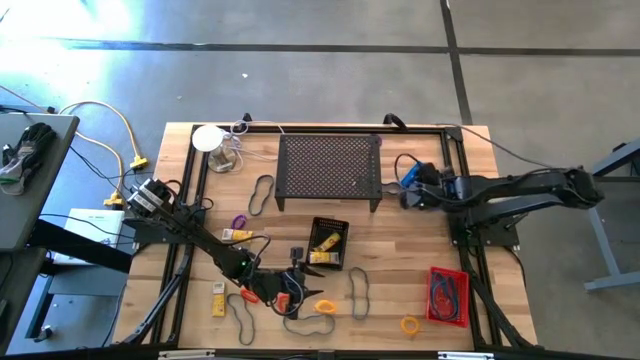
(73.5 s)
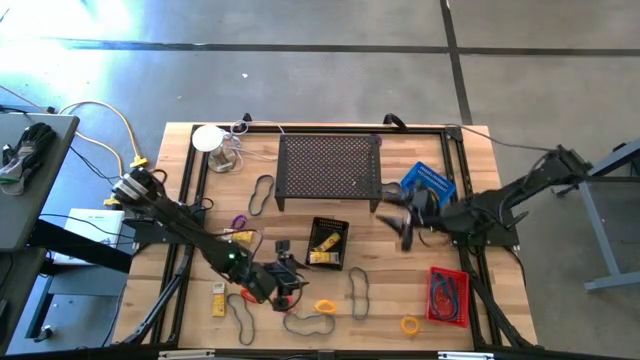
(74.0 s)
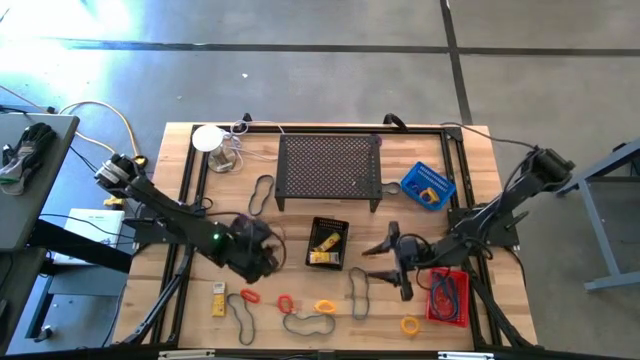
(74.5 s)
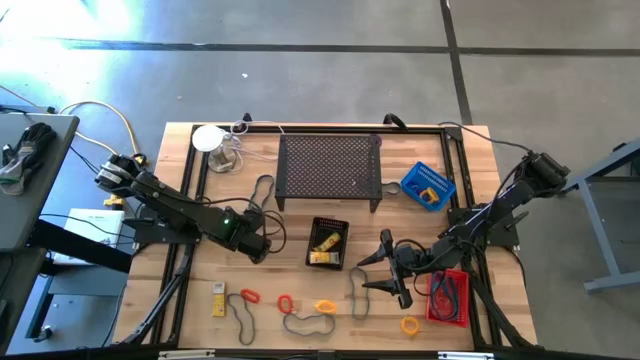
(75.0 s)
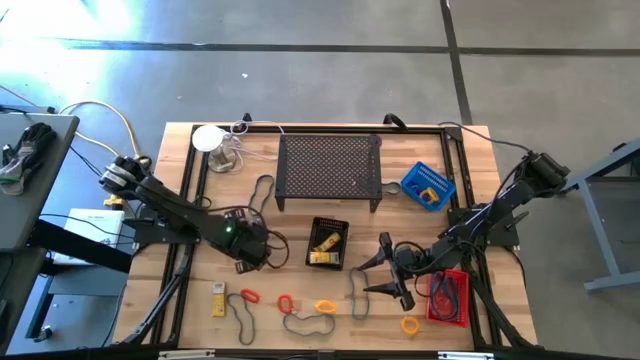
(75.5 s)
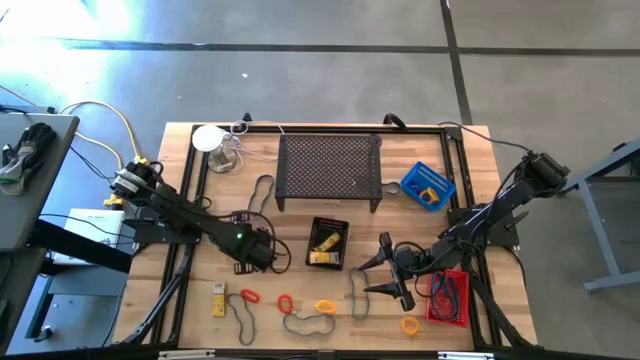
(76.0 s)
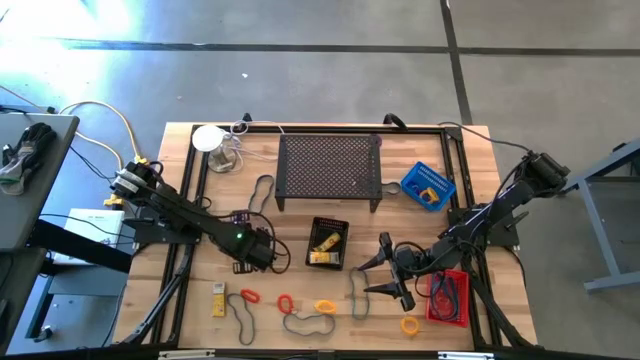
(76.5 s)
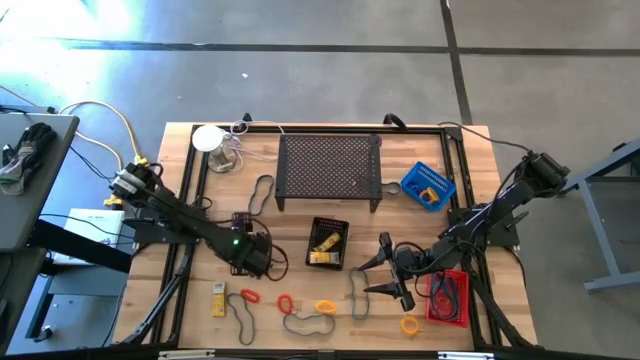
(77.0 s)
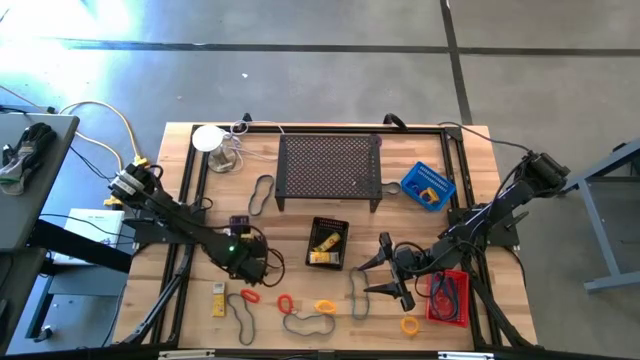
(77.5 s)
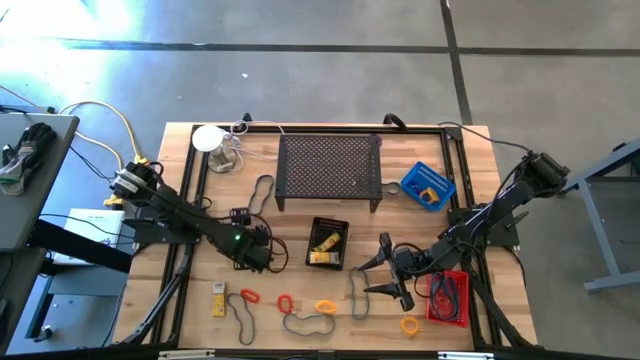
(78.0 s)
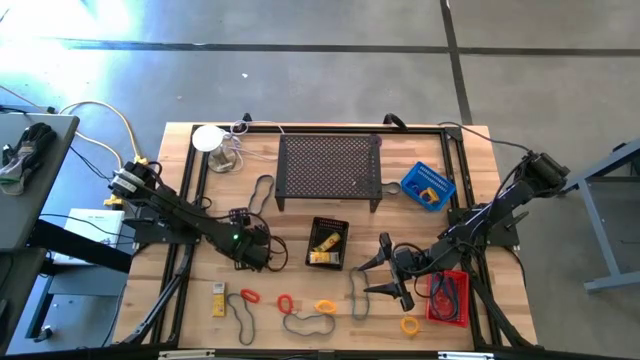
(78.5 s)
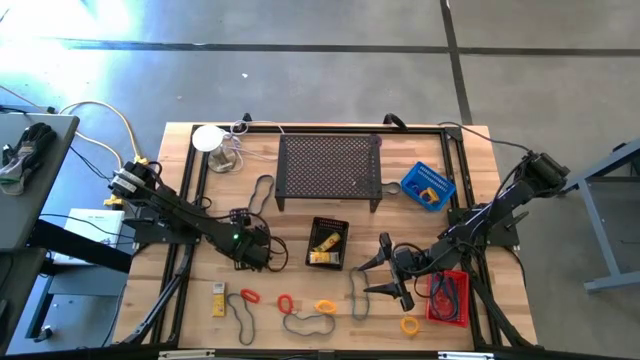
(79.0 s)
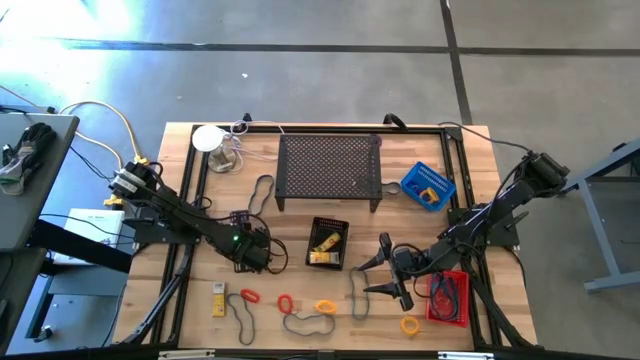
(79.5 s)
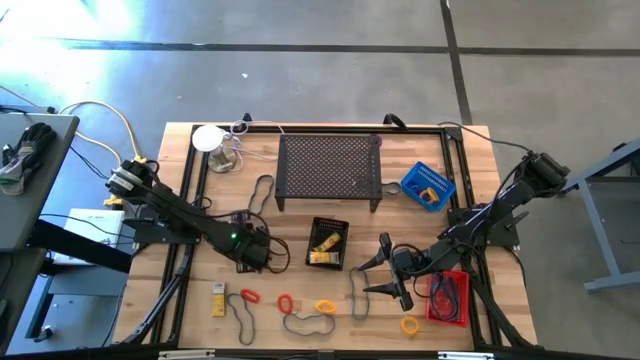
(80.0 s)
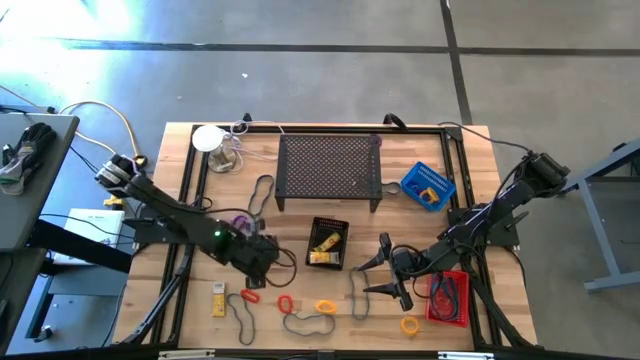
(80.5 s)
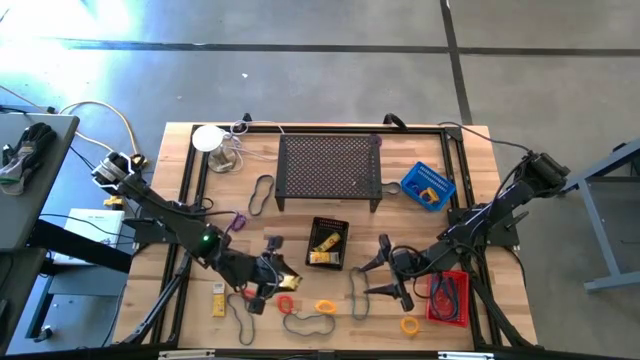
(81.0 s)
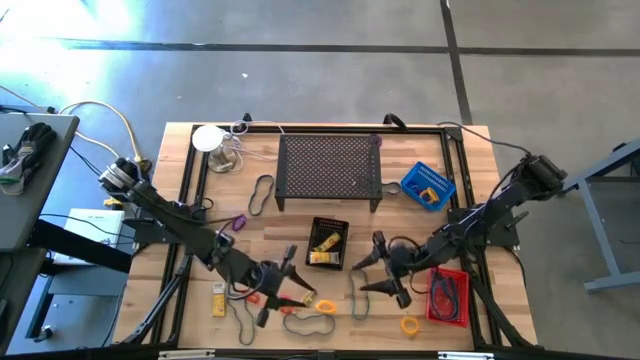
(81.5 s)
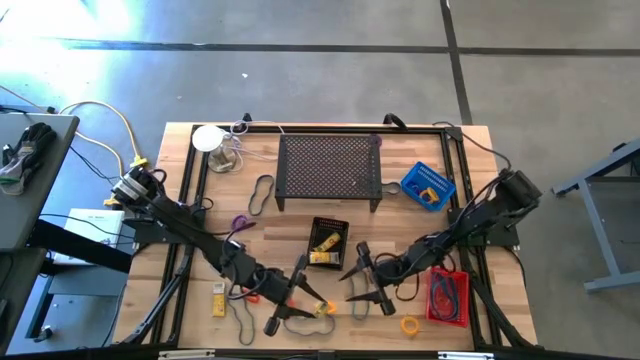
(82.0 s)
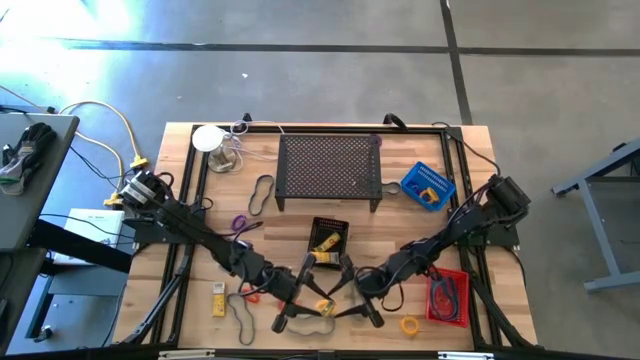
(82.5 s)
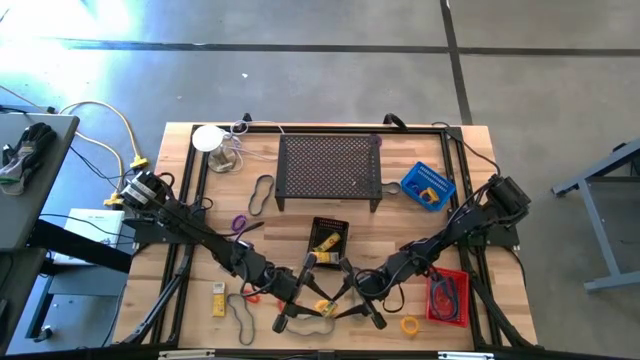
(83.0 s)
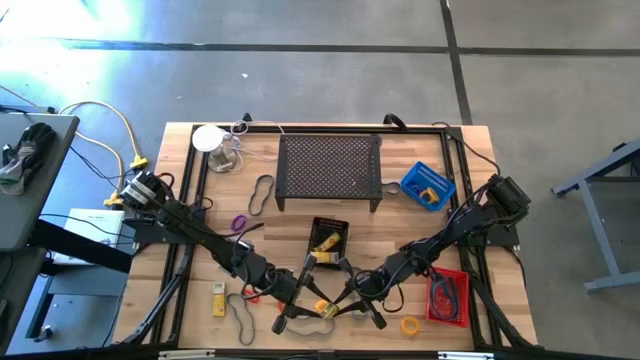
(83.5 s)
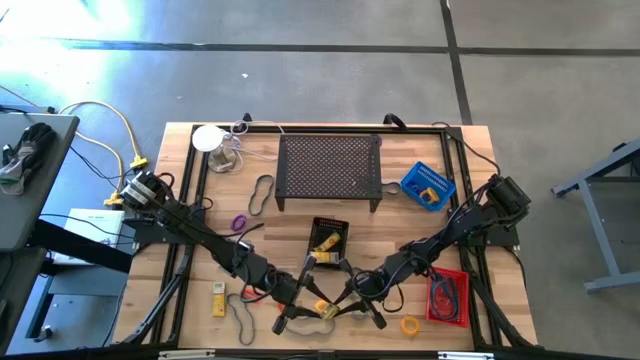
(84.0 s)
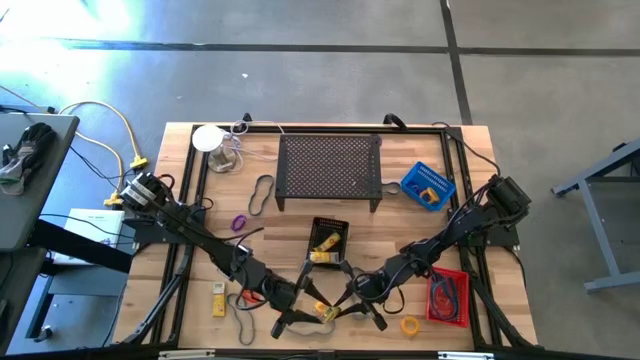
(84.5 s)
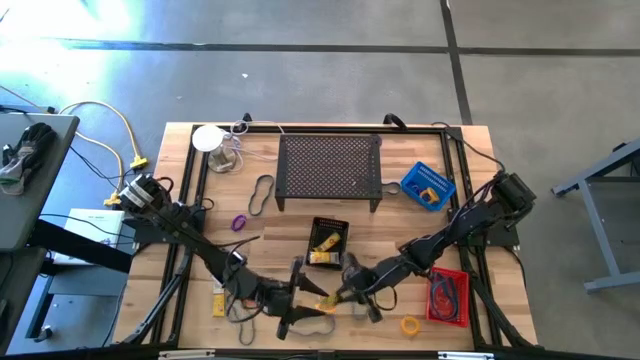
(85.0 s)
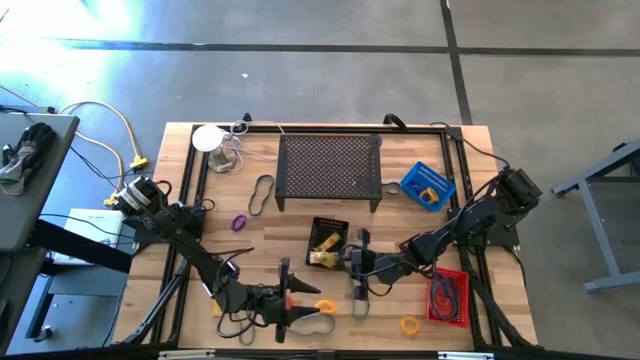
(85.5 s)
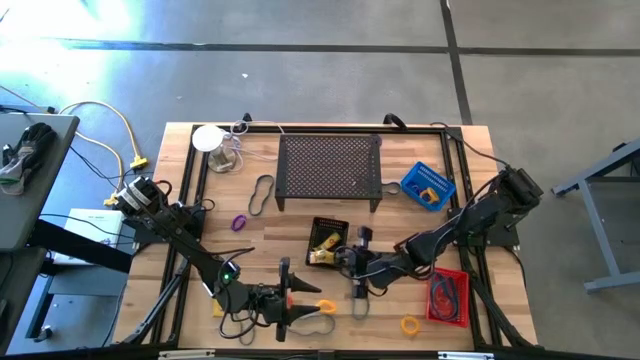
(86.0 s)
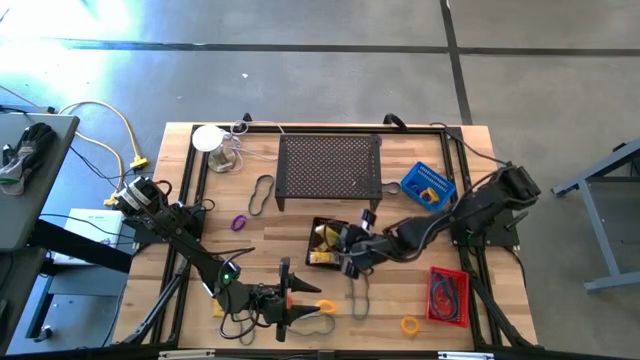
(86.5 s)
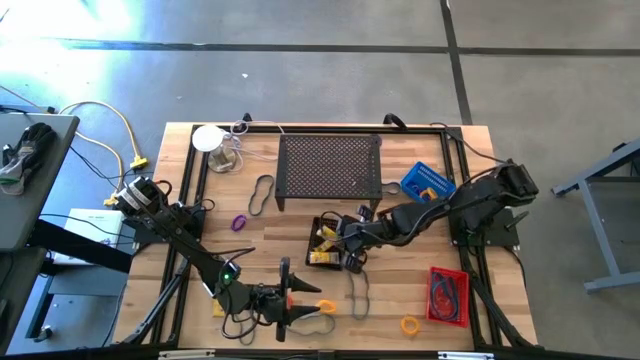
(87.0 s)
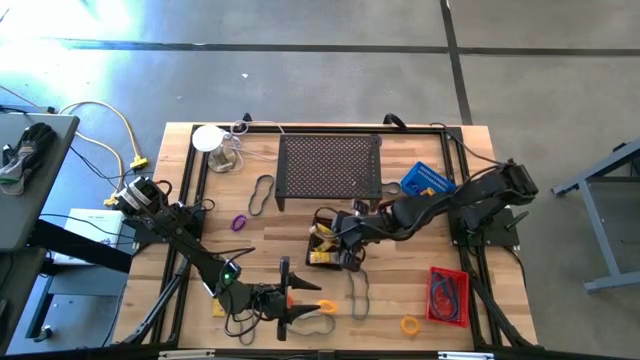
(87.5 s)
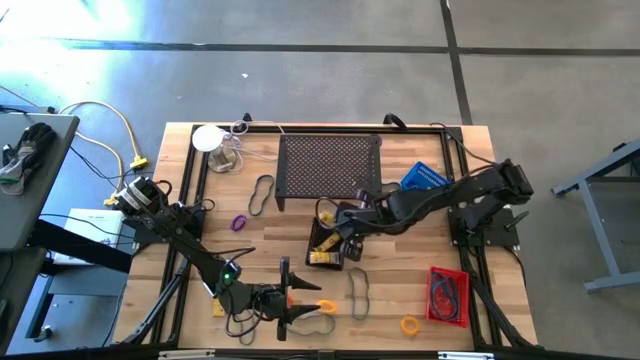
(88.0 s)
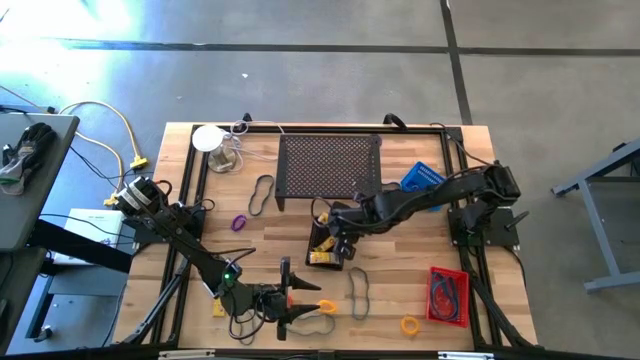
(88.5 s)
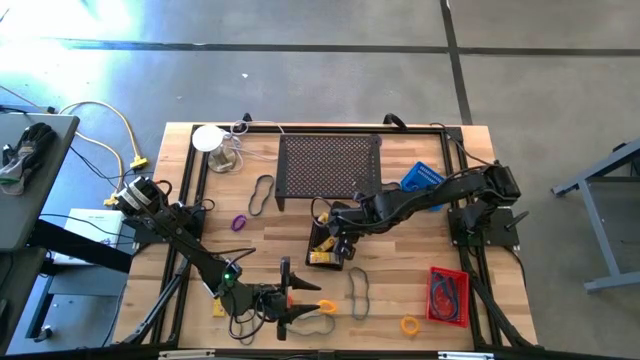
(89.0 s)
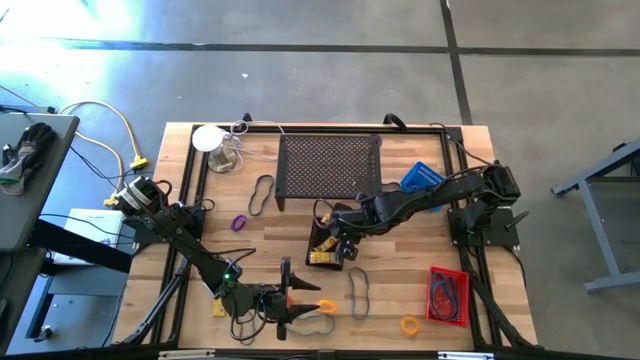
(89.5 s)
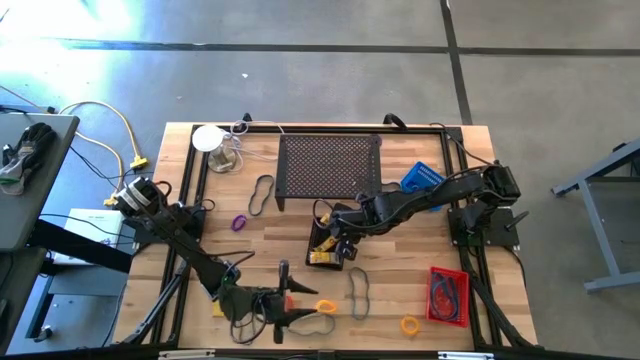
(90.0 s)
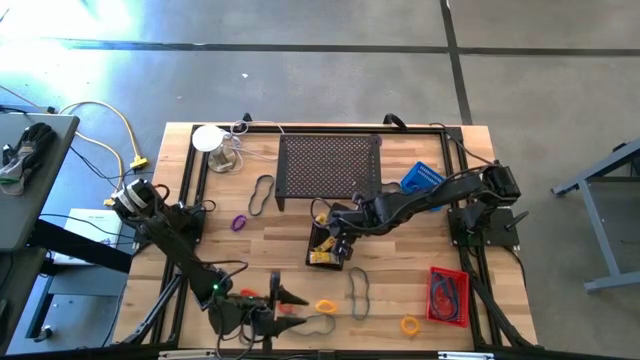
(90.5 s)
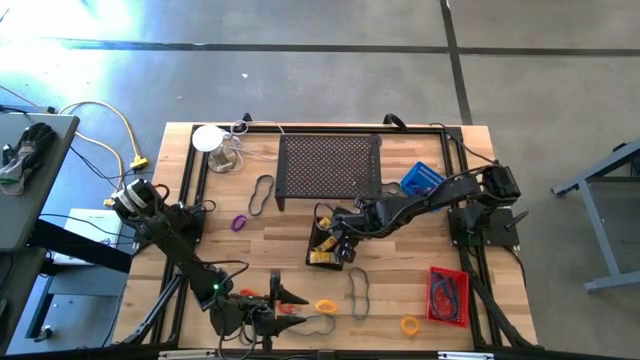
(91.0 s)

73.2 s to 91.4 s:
Task: Pick & Place Office Desk Supplies
Put the yellow crayon box into the black bin
